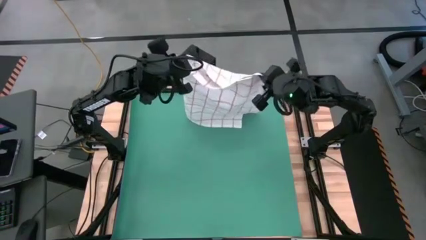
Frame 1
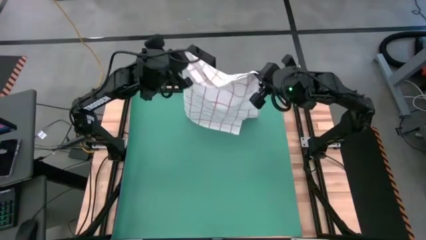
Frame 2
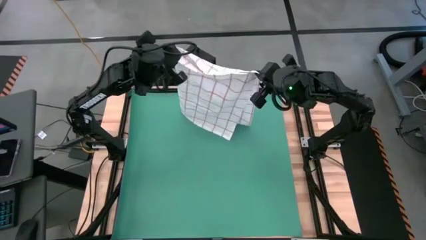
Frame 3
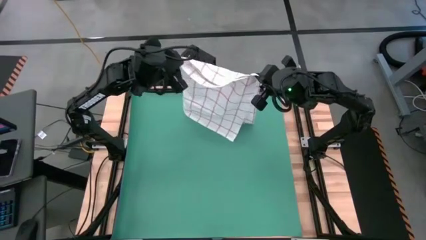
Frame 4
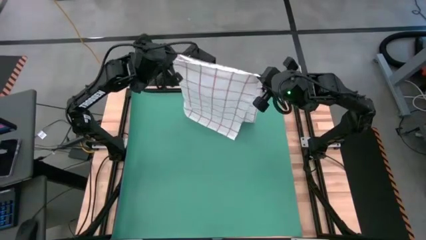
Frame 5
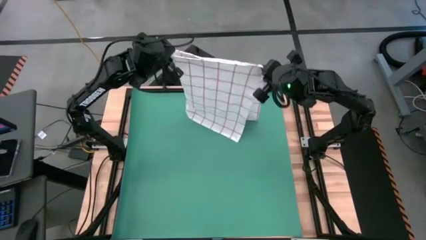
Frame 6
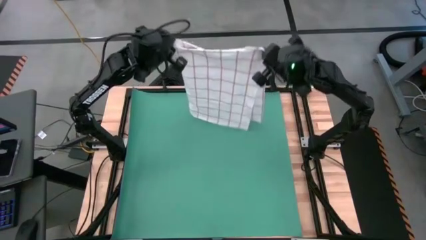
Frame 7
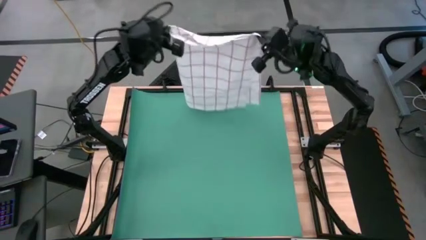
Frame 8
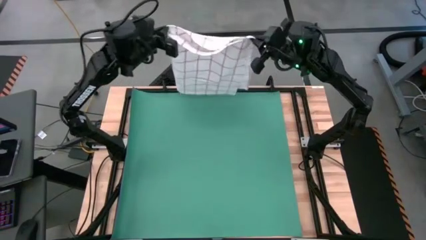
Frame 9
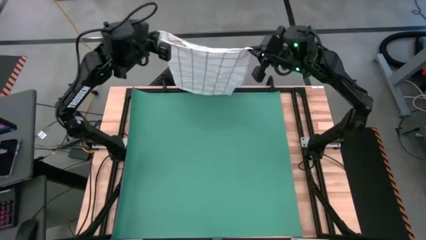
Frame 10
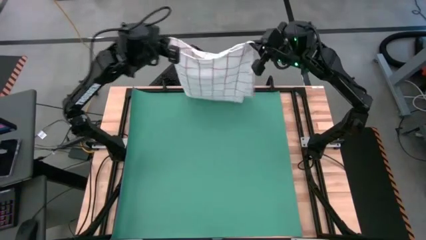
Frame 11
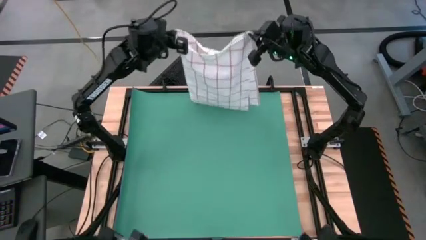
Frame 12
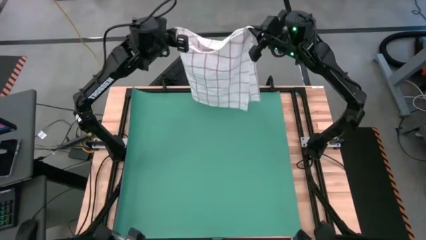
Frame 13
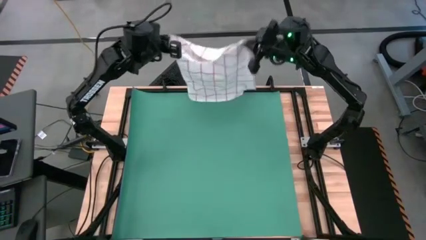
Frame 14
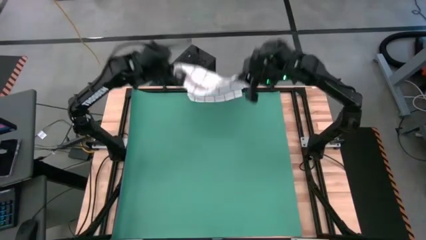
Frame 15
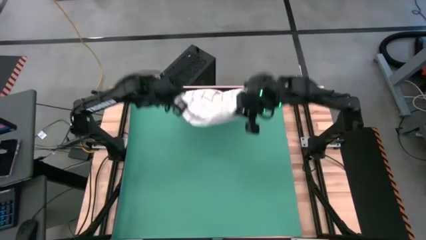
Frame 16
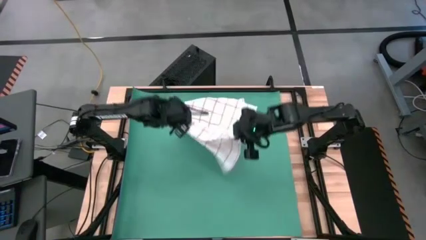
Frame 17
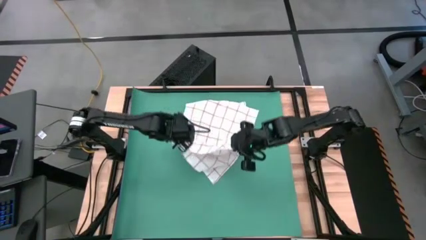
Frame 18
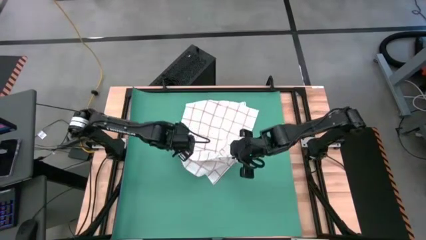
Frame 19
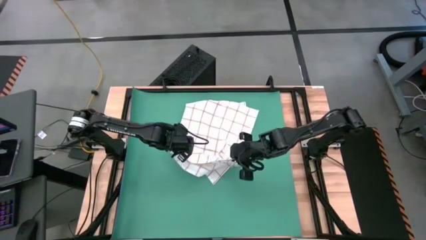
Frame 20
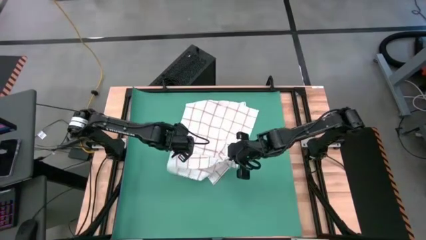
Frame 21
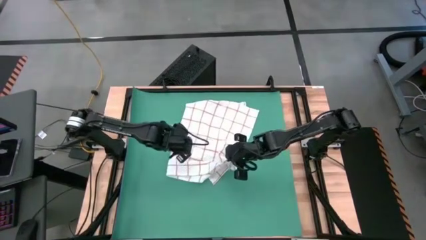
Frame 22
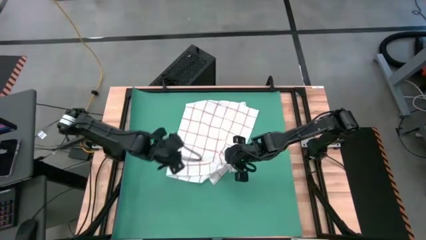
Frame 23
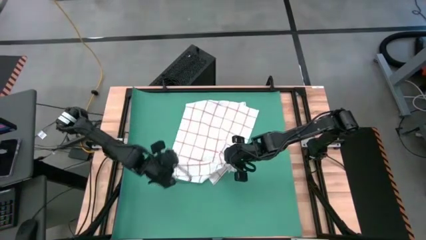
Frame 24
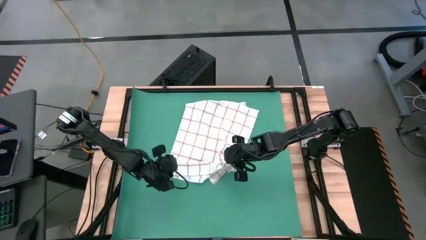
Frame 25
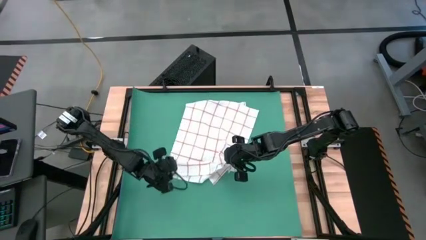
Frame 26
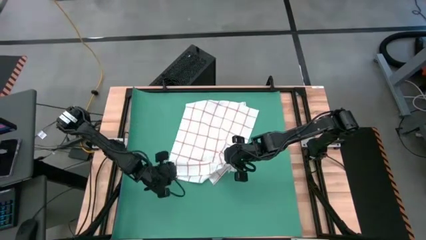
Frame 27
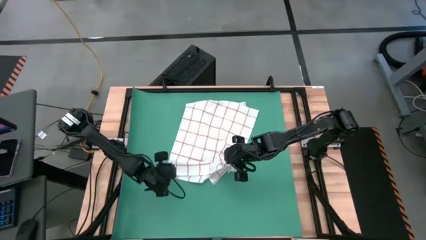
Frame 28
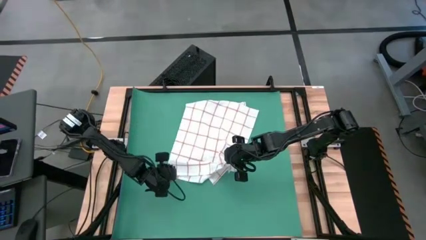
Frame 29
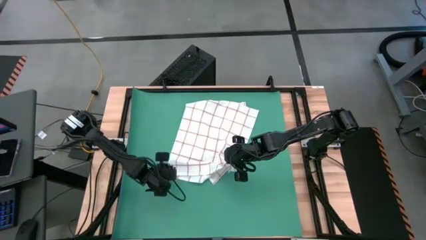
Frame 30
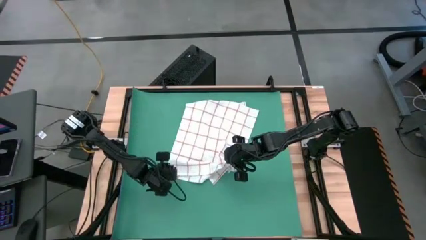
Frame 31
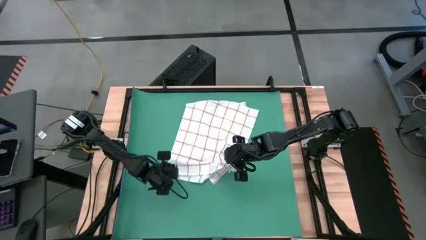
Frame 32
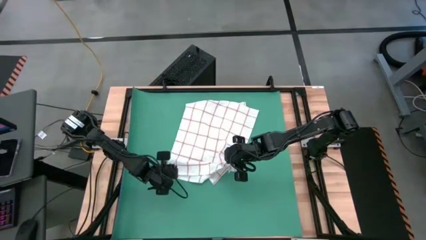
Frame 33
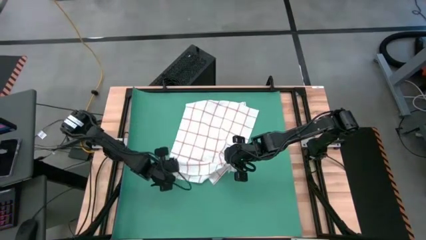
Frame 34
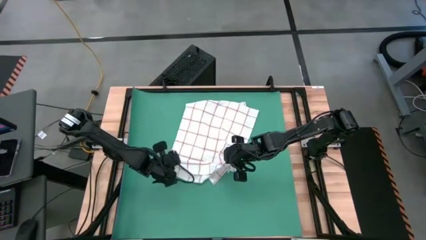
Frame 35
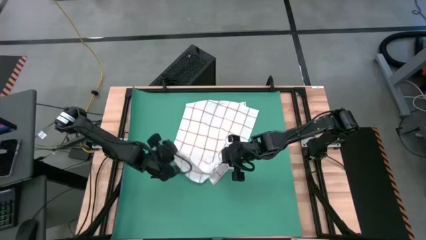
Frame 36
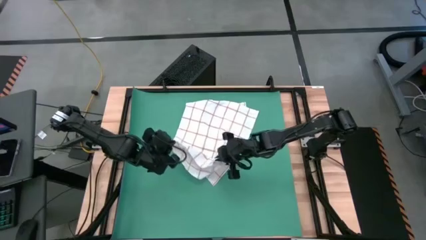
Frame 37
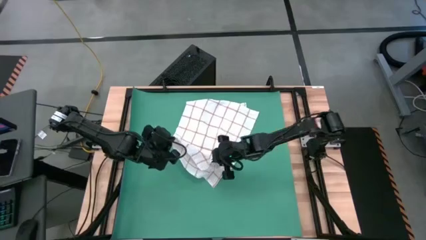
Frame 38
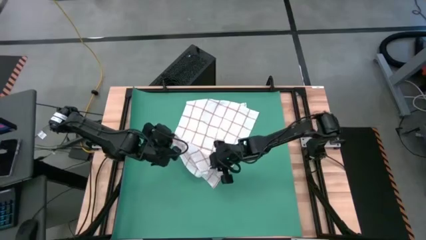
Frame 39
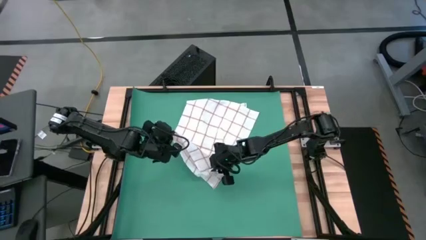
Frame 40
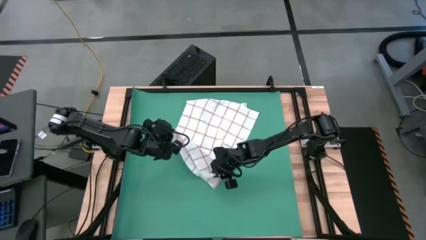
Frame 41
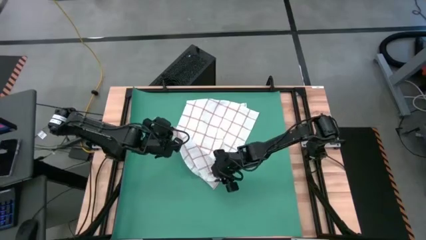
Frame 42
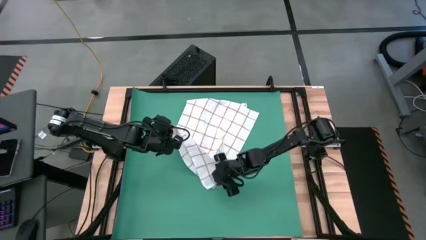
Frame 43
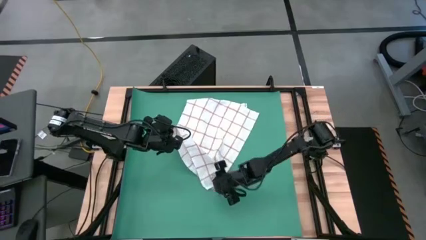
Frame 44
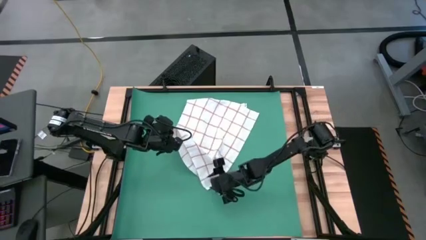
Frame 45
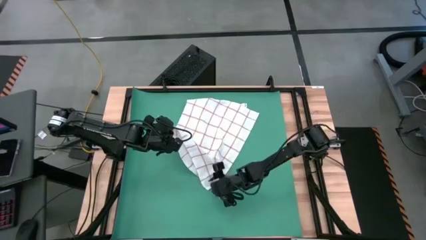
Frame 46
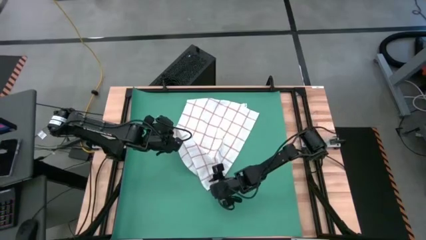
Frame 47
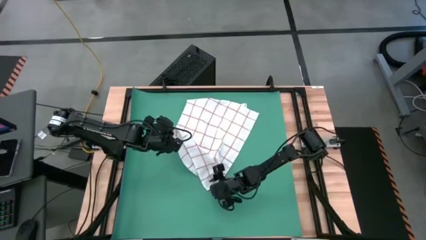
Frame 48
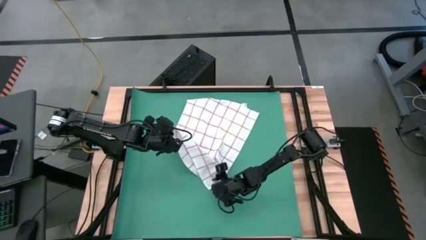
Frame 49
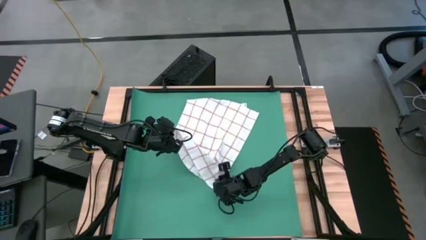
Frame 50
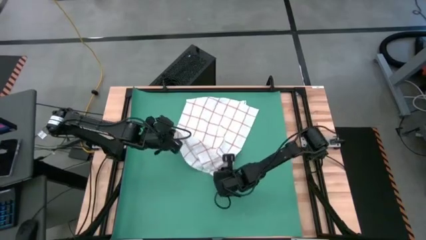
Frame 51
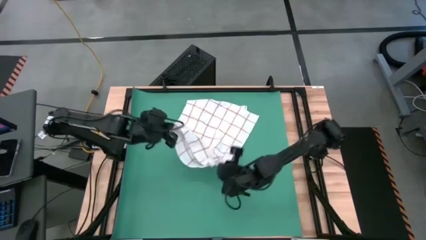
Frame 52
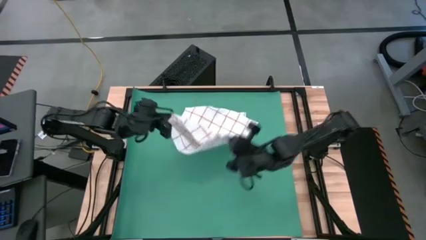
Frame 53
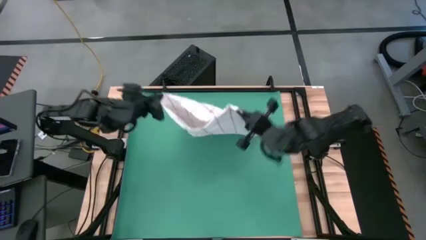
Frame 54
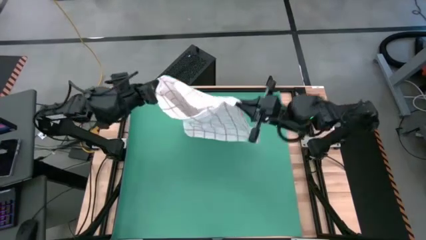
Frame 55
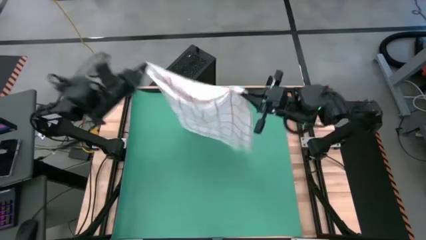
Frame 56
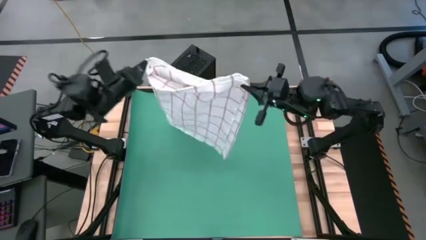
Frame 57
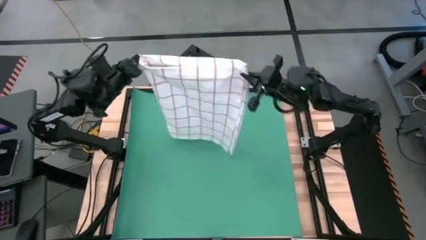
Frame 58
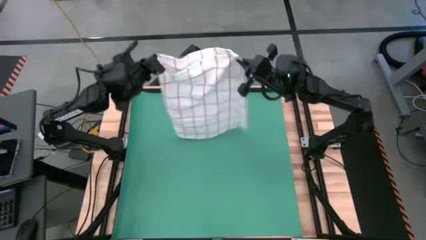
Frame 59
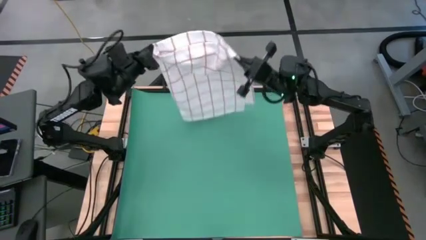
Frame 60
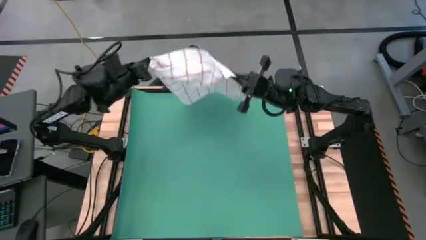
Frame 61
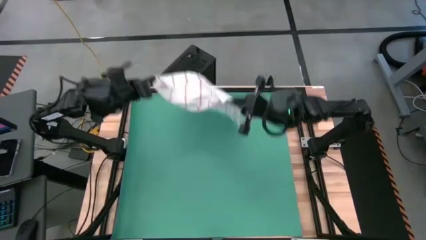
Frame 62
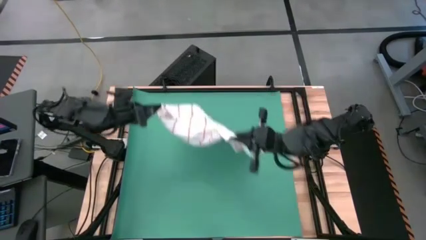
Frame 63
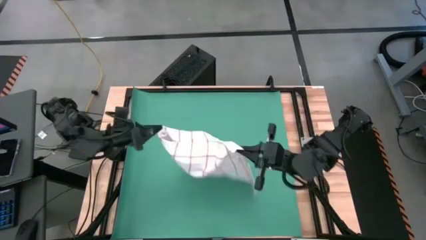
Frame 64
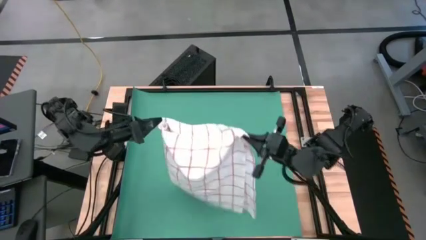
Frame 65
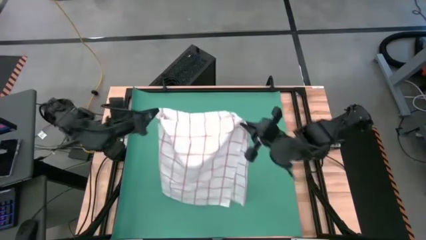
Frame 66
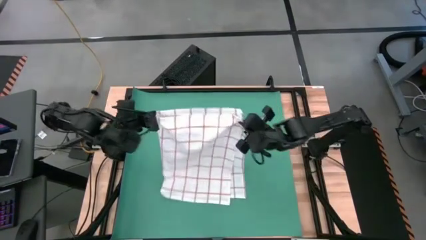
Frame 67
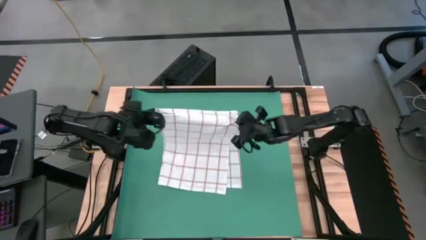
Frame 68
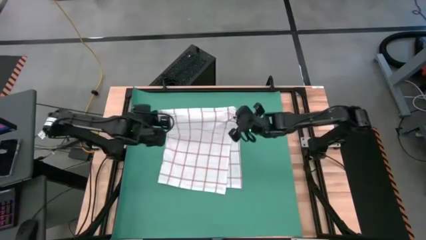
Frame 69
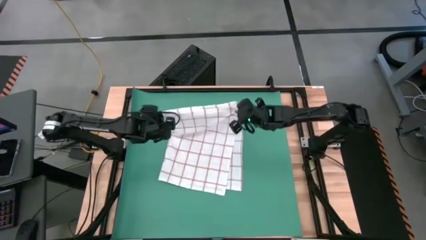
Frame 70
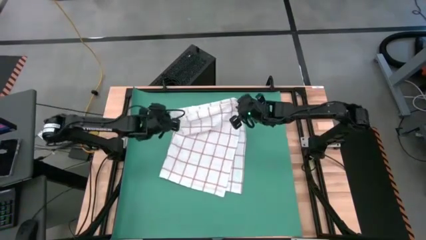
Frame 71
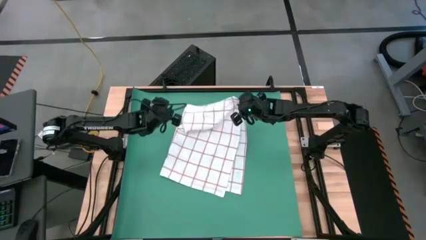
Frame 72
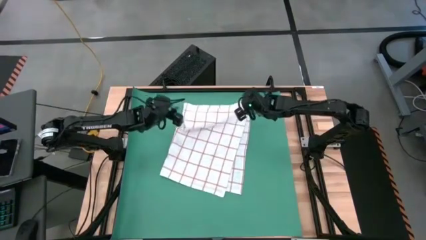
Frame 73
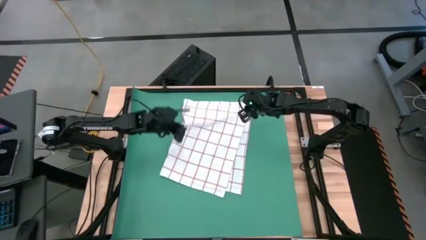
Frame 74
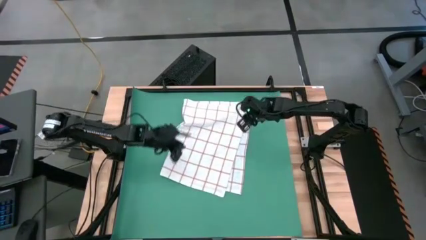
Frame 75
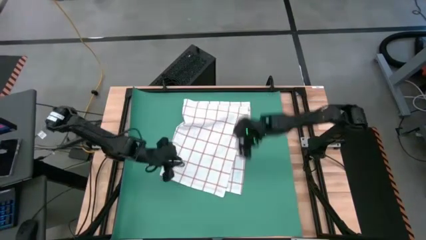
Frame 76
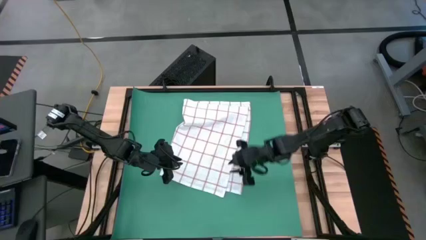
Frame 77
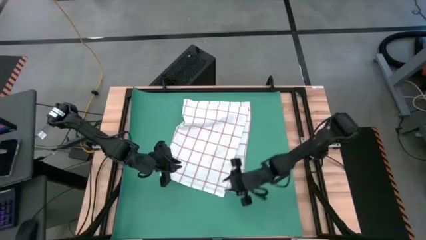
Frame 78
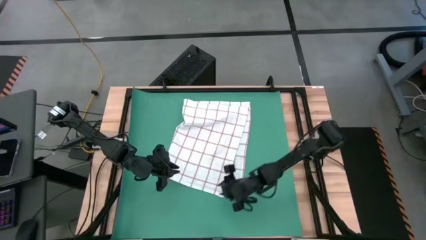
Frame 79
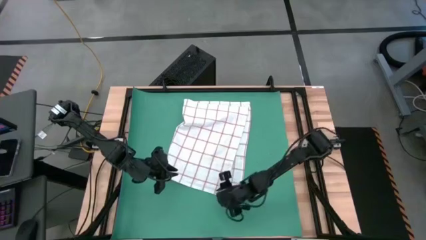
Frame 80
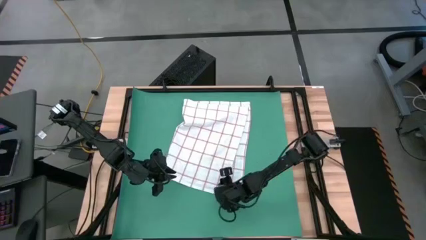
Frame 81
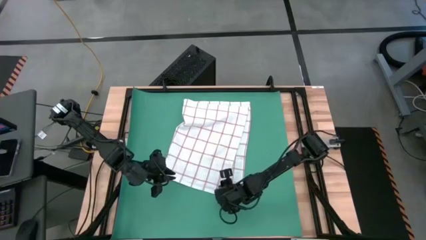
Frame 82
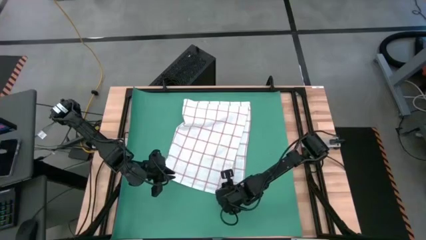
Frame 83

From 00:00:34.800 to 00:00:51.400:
Task: Roll towel
Roll the white stripe towel
